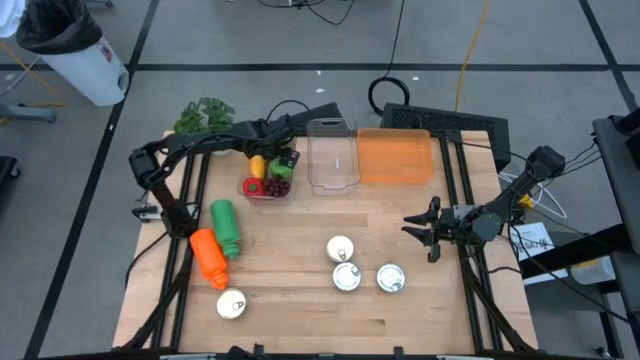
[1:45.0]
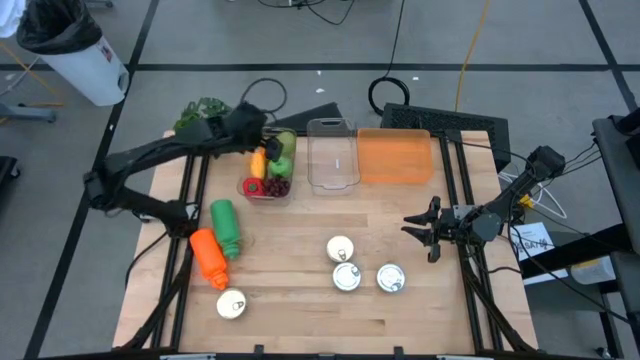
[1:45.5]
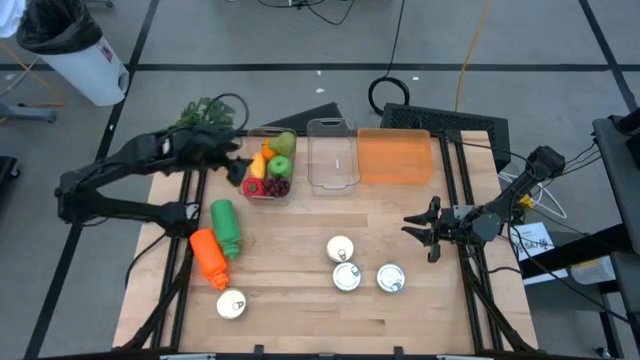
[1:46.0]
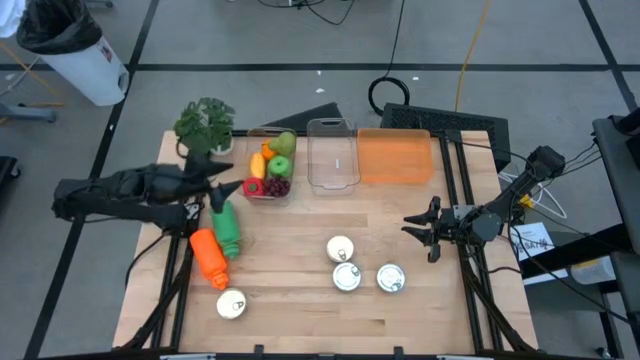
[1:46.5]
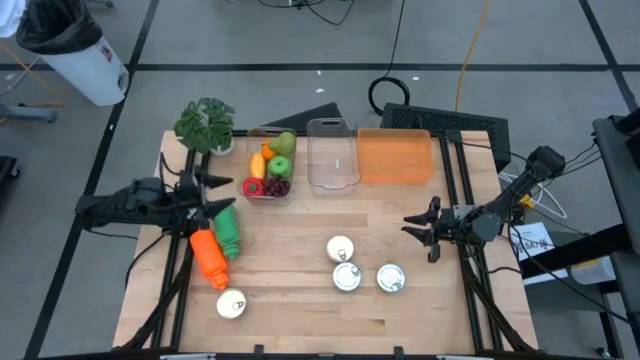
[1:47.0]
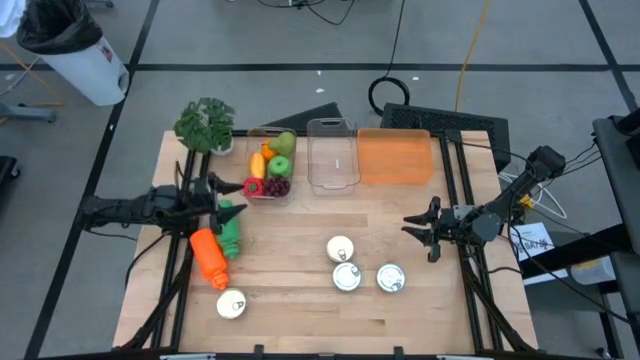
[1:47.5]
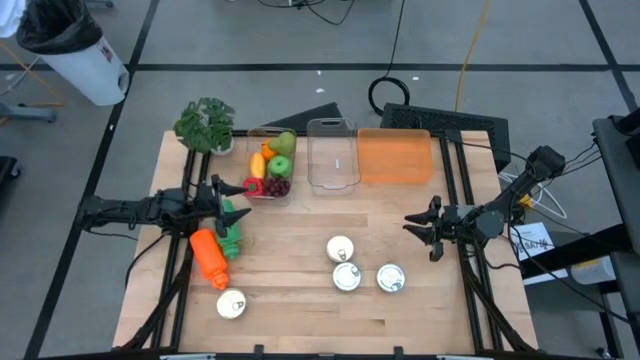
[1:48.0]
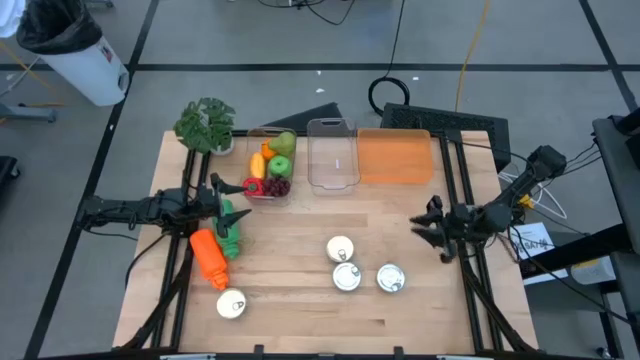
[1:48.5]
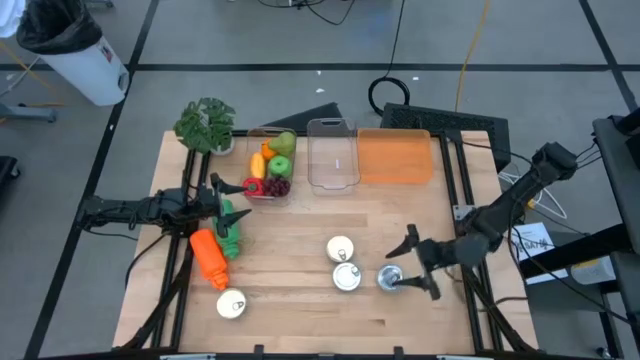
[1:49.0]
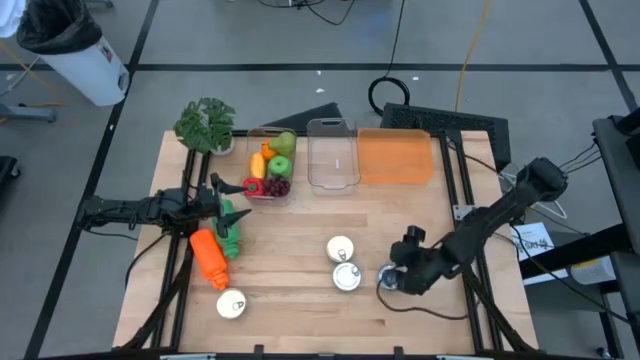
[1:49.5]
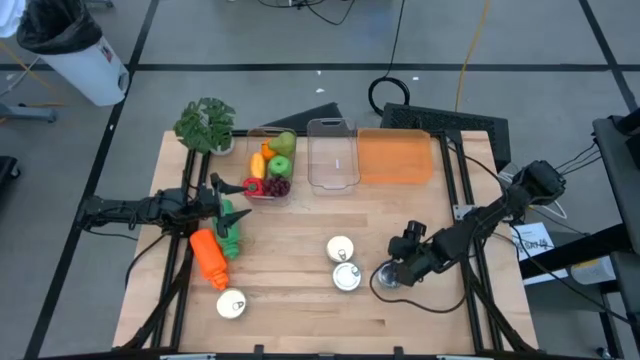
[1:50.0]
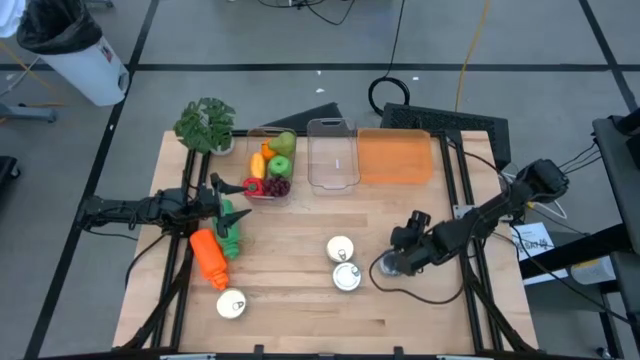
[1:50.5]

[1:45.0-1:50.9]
Task: Pick & Place Food Item
Put the right green tuna can into the right transparent bin

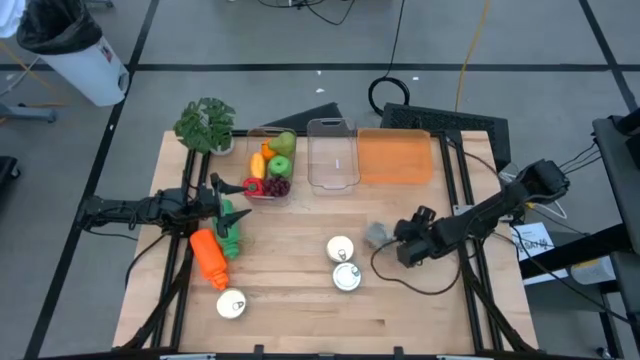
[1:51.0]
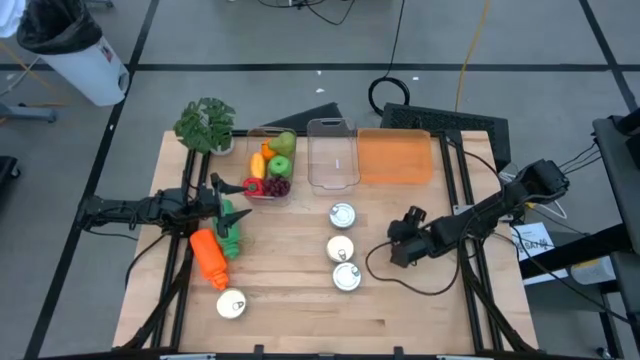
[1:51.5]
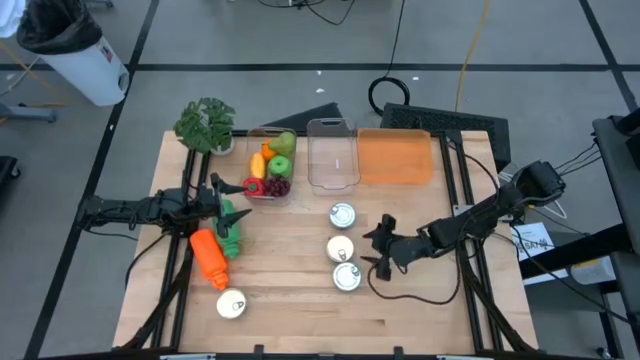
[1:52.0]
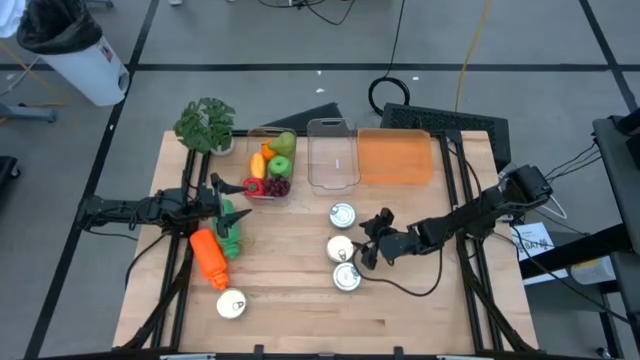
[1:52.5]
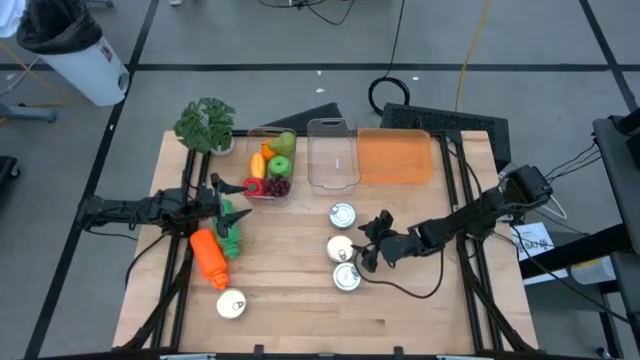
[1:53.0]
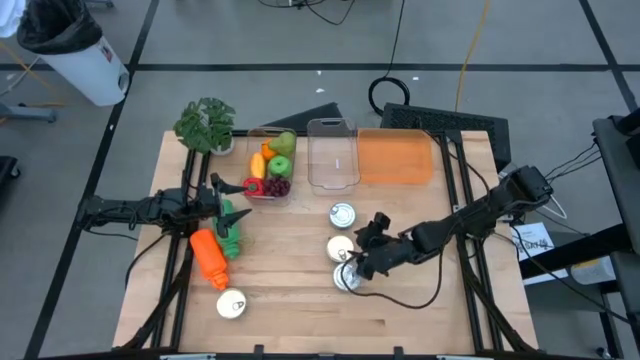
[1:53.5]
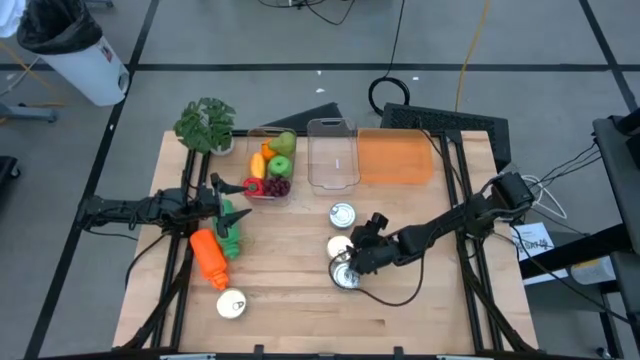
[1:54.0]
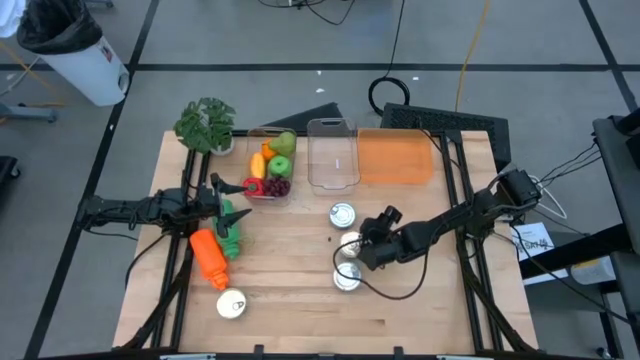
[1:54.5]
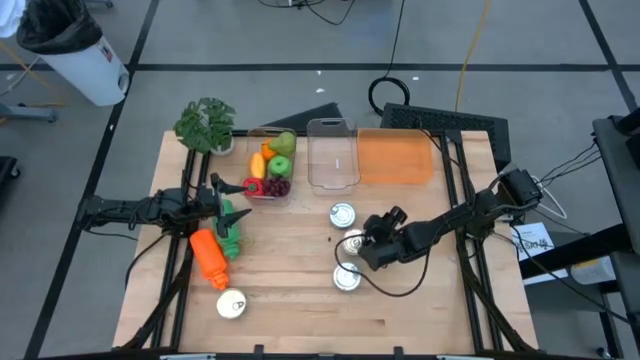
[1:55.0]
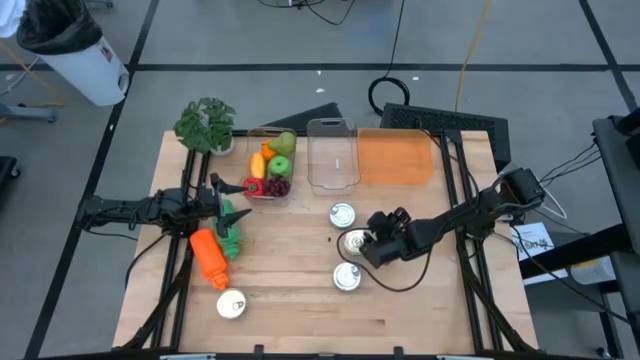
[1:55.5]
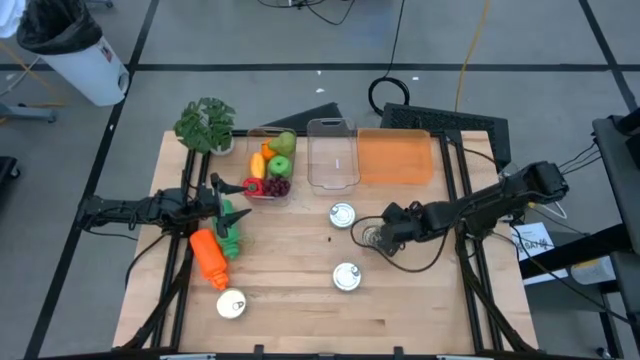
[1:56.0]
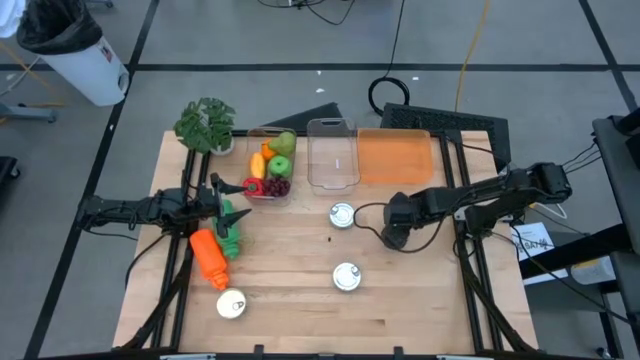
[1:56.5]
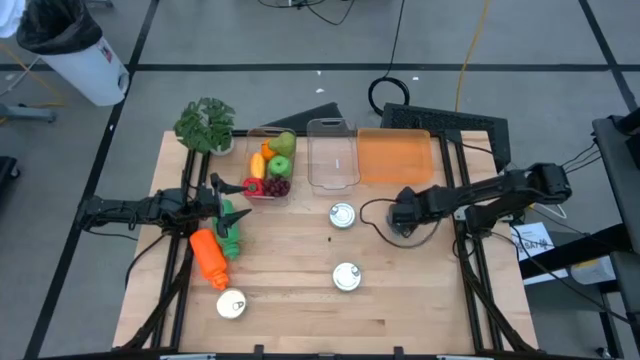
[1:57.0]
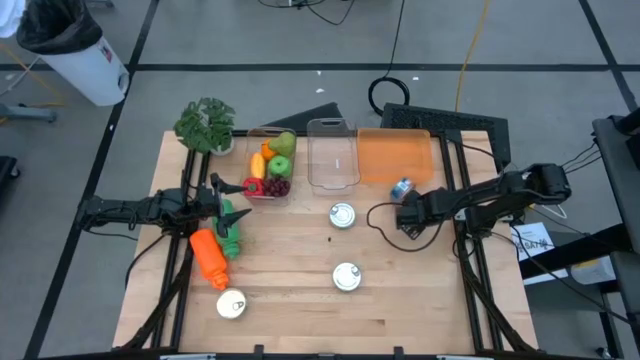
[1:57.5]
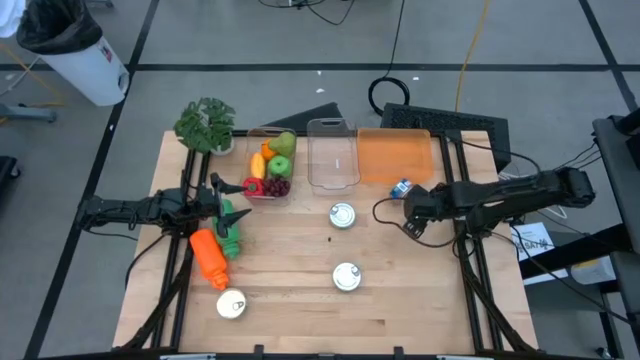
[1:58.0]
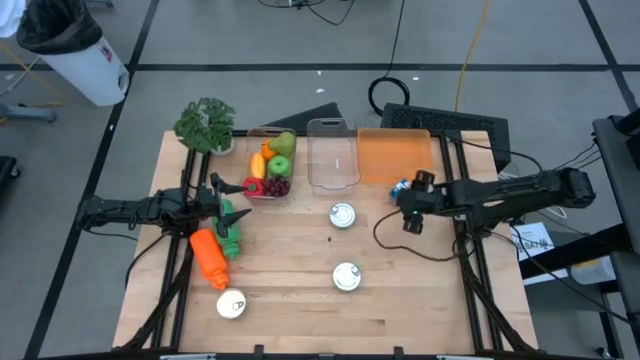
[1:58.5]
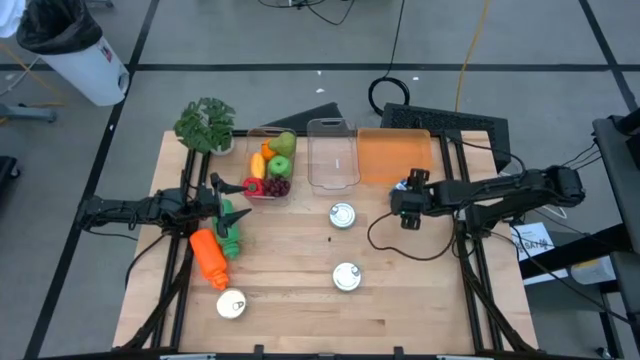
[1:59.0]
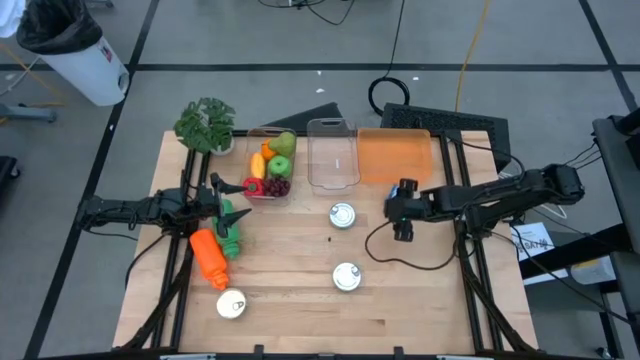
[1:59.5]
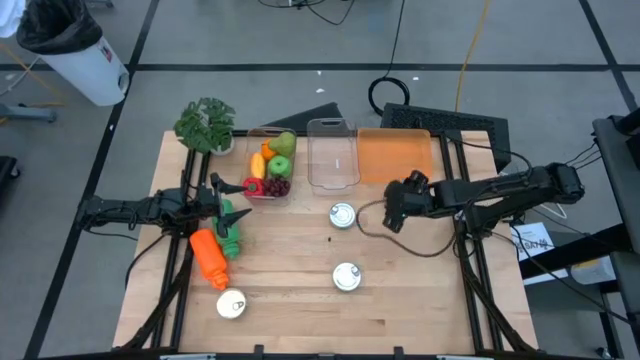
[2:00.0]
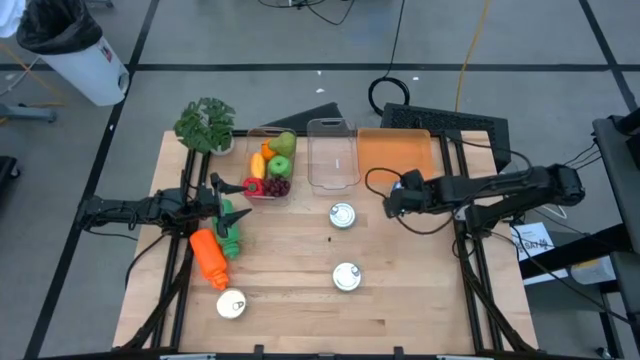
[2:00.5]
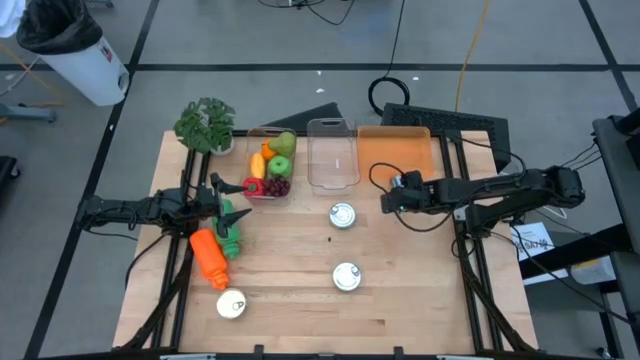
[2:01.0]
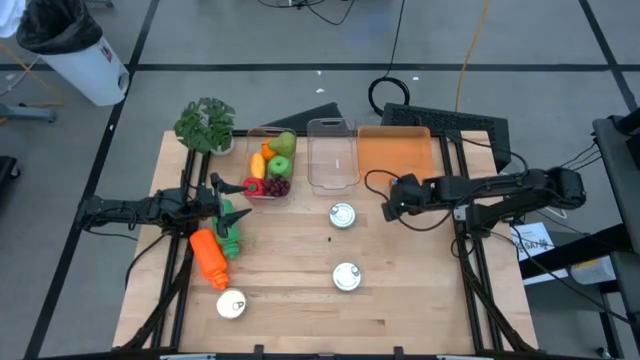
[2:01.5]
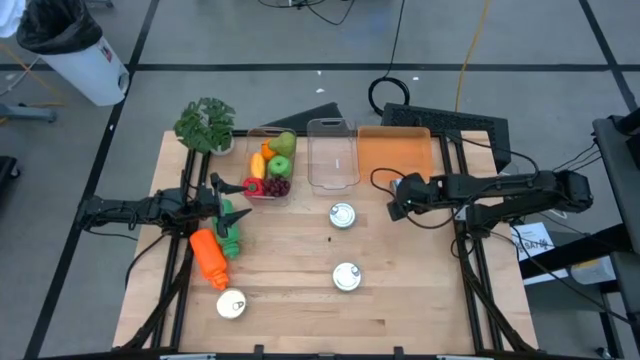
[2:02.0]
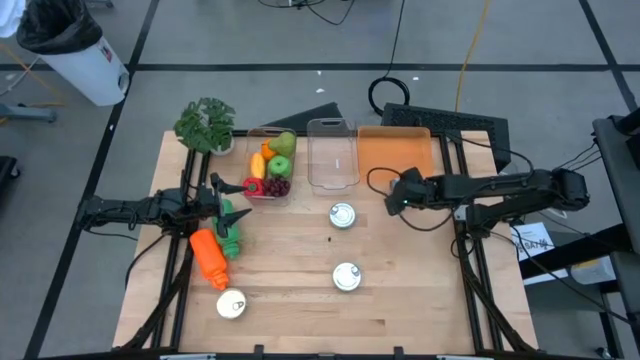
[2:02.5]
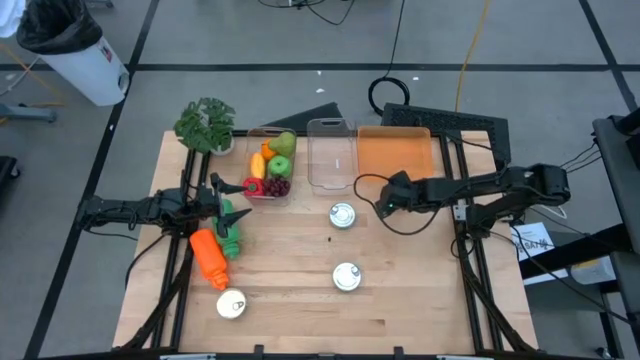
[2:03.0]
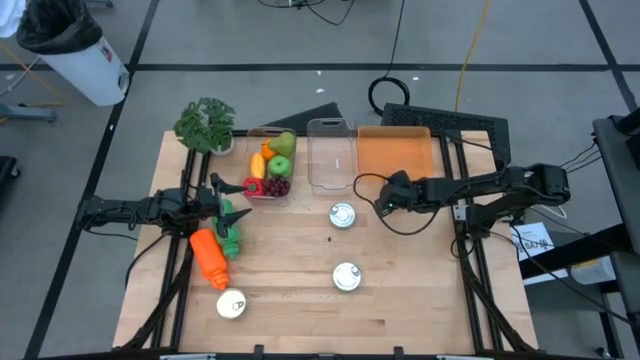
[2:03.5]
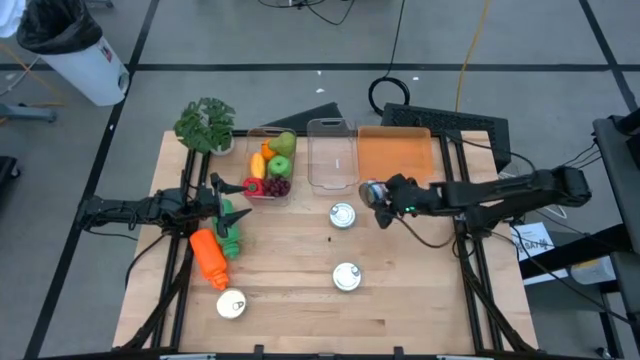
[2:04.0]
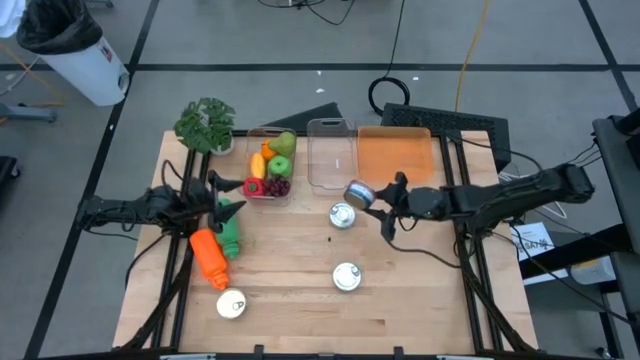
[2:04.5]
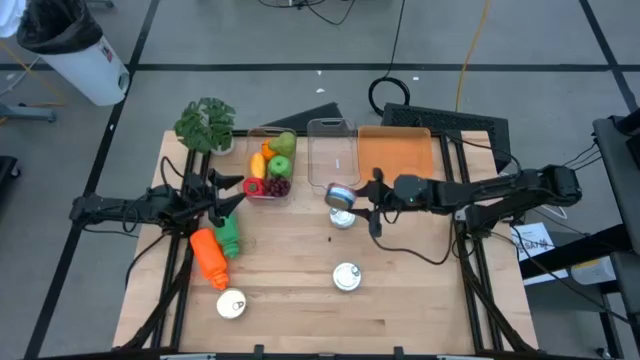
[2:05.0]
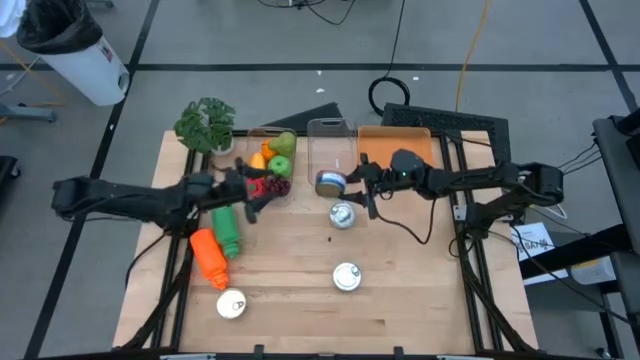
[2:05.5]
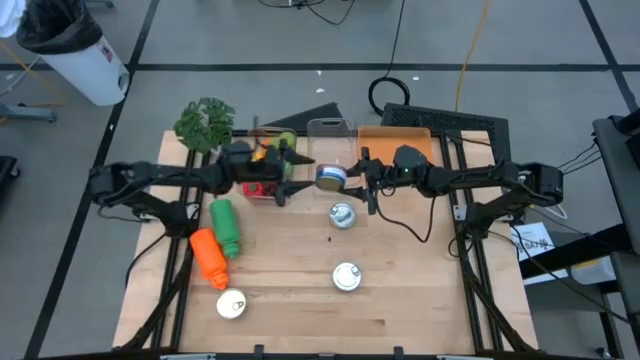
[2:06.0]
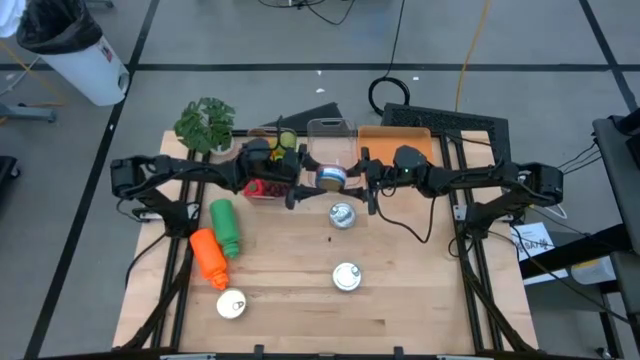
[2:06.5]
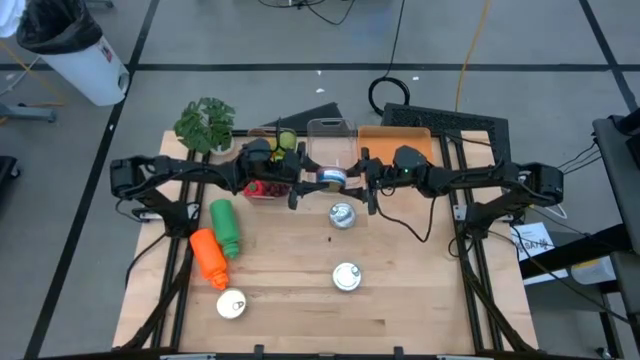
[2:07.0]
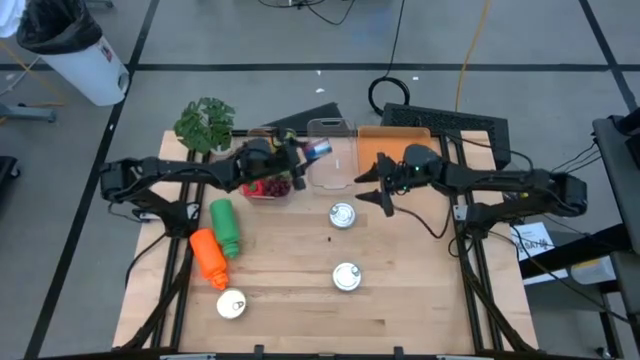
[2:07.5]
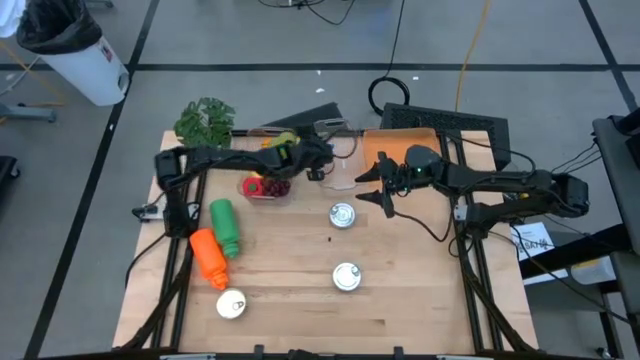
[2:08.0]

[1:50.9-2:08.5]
Put the top blue pink tuna can into the right transparent bin
